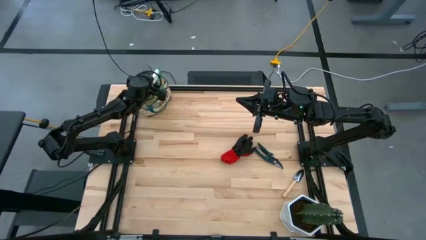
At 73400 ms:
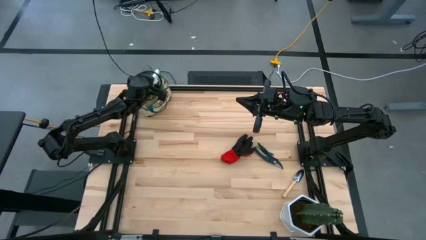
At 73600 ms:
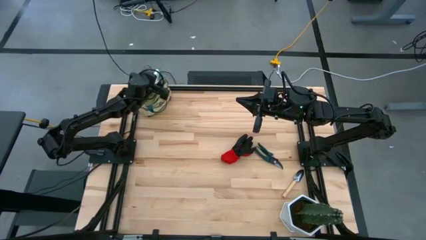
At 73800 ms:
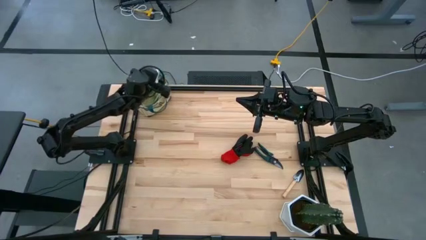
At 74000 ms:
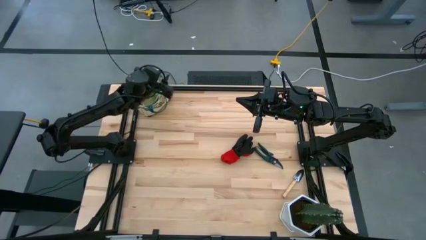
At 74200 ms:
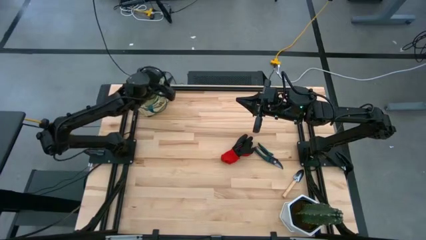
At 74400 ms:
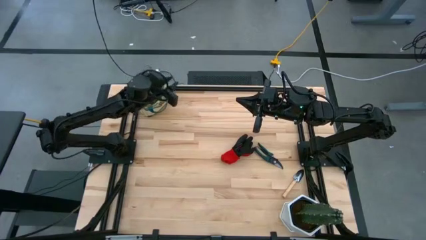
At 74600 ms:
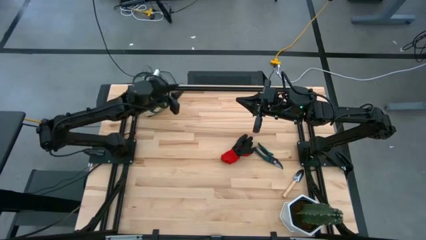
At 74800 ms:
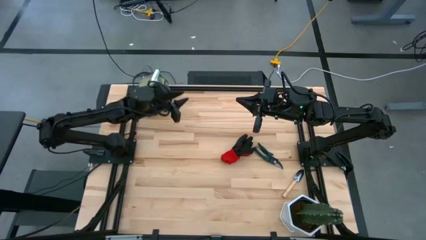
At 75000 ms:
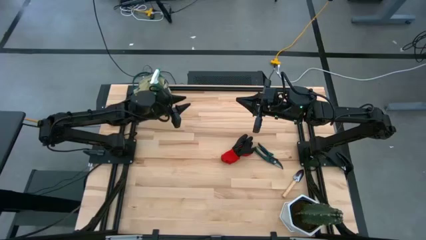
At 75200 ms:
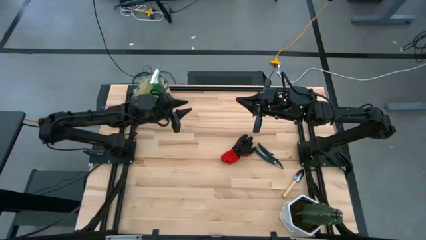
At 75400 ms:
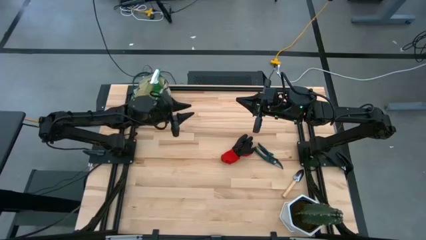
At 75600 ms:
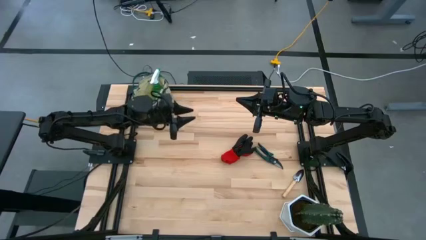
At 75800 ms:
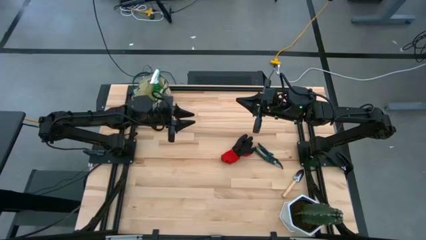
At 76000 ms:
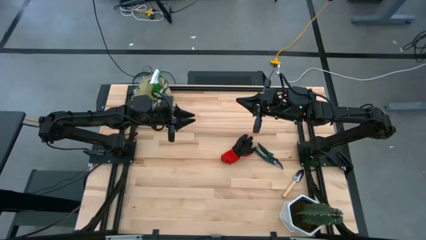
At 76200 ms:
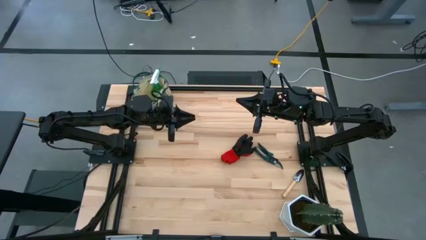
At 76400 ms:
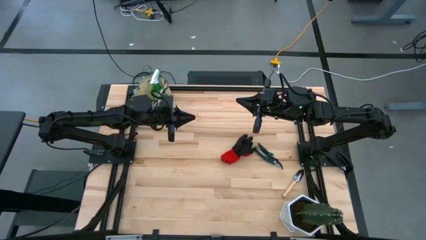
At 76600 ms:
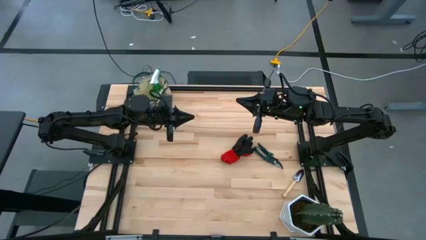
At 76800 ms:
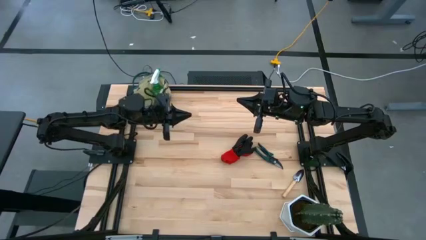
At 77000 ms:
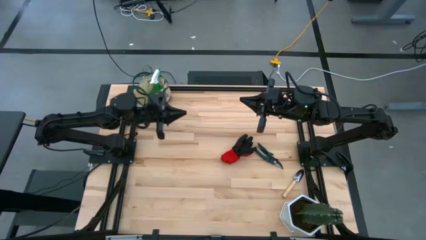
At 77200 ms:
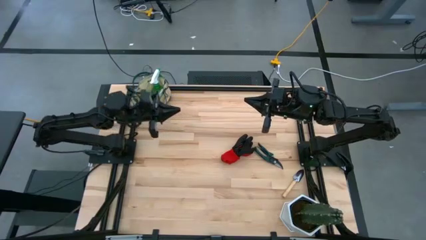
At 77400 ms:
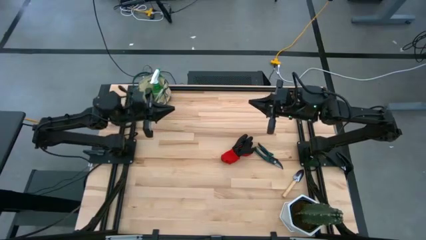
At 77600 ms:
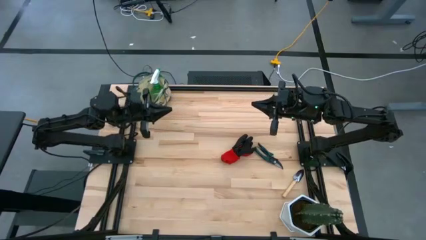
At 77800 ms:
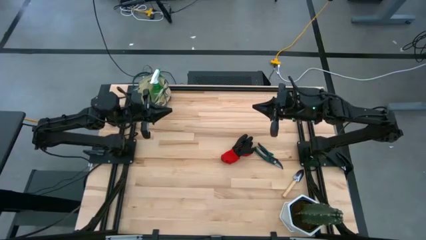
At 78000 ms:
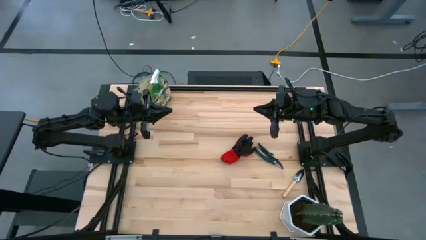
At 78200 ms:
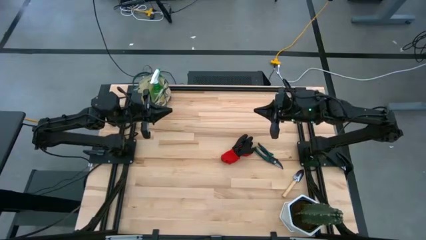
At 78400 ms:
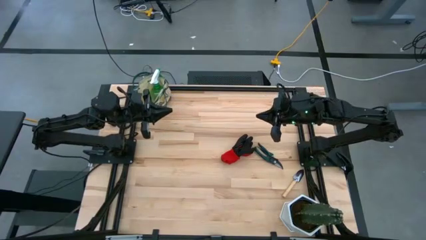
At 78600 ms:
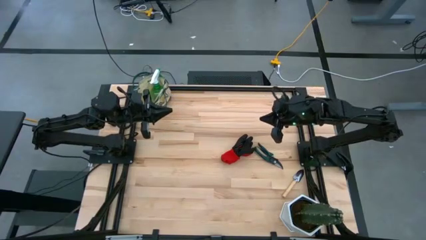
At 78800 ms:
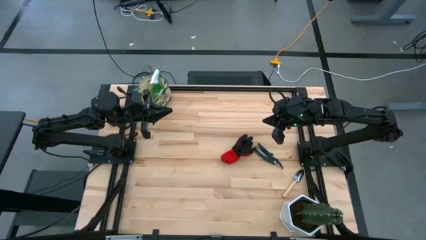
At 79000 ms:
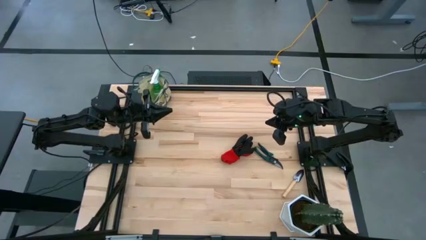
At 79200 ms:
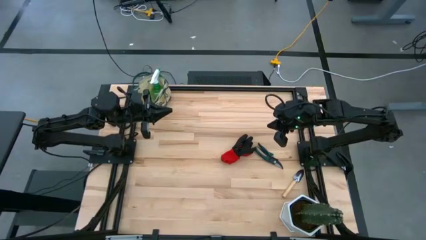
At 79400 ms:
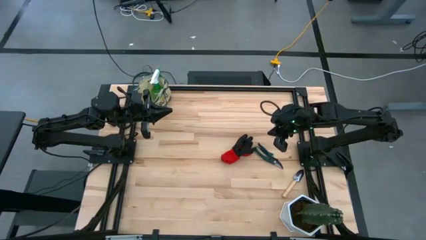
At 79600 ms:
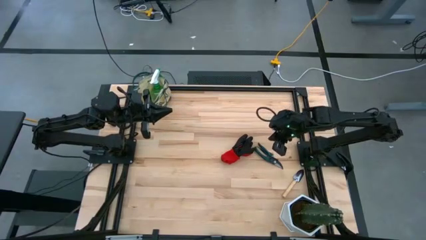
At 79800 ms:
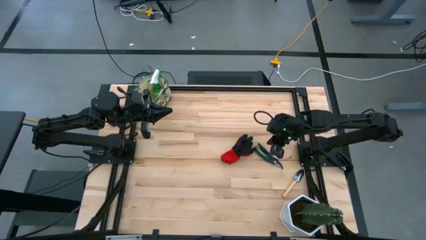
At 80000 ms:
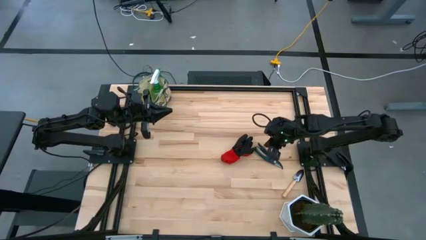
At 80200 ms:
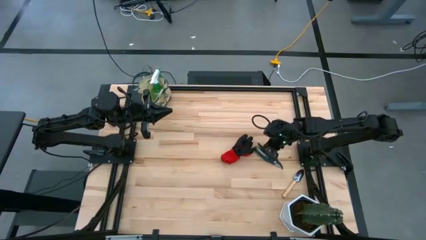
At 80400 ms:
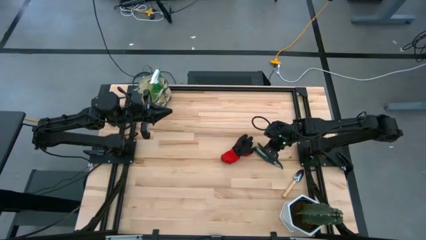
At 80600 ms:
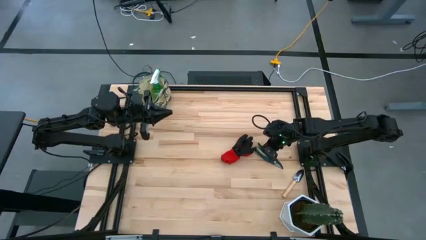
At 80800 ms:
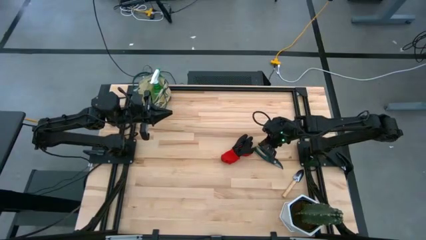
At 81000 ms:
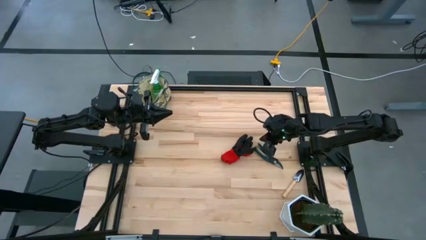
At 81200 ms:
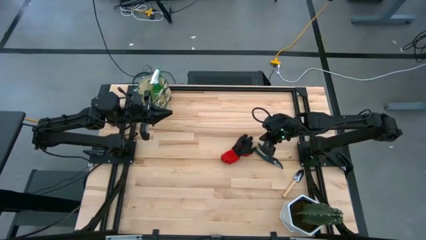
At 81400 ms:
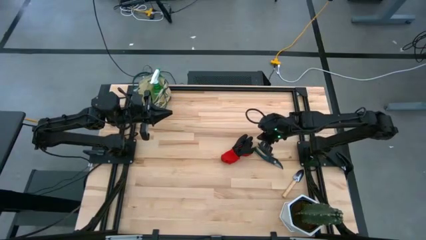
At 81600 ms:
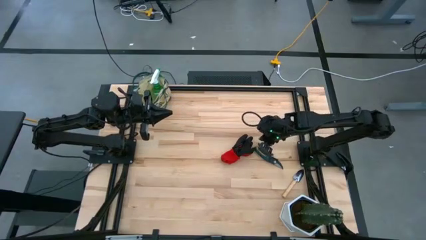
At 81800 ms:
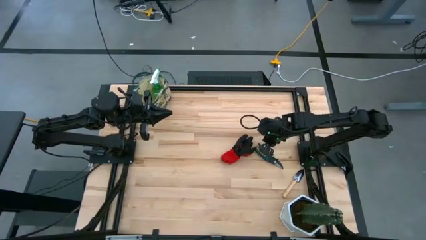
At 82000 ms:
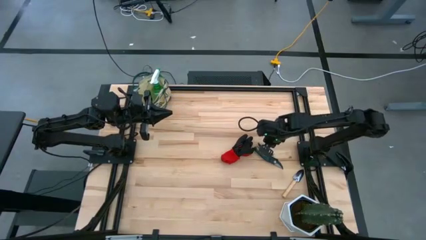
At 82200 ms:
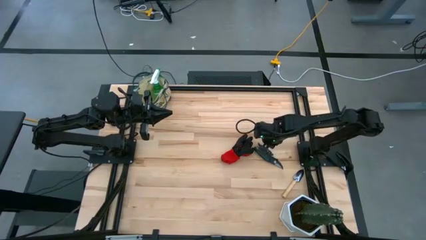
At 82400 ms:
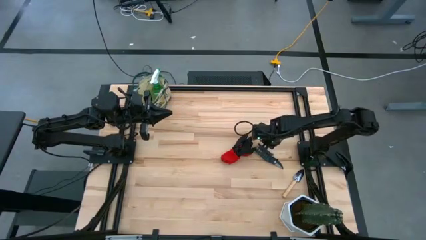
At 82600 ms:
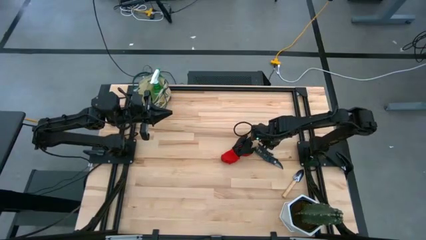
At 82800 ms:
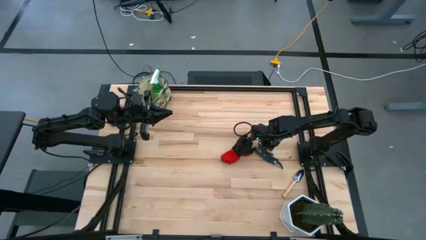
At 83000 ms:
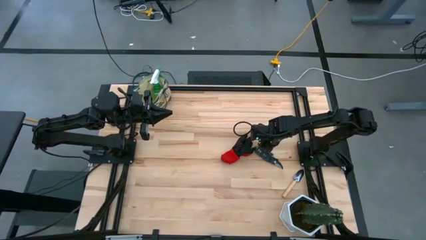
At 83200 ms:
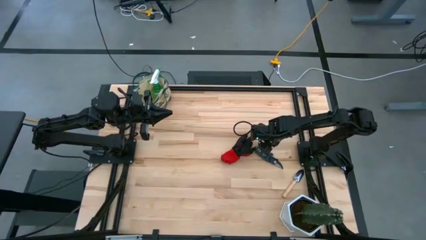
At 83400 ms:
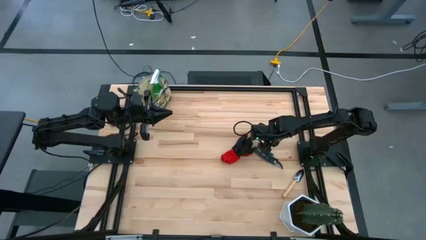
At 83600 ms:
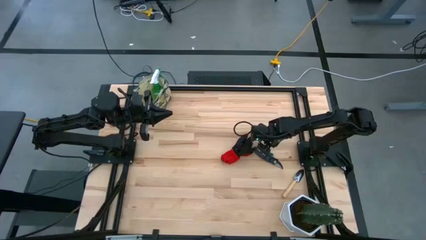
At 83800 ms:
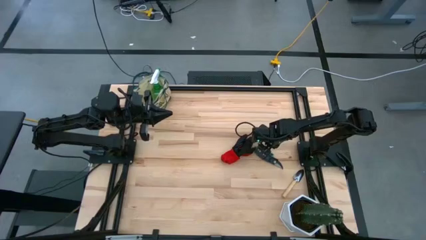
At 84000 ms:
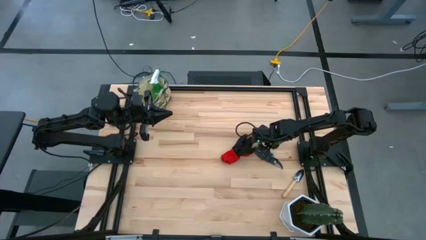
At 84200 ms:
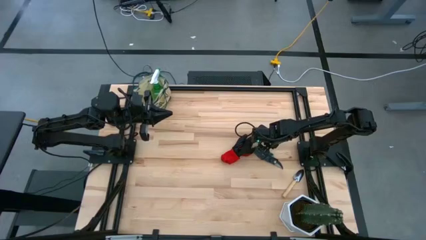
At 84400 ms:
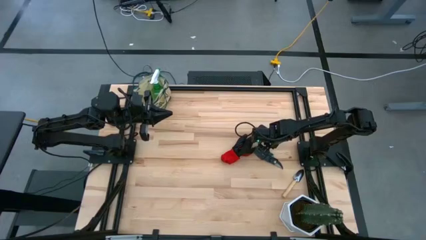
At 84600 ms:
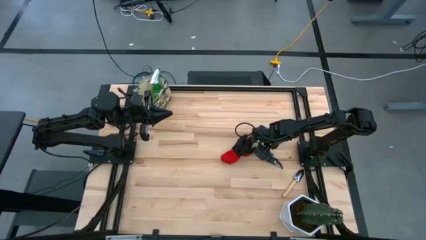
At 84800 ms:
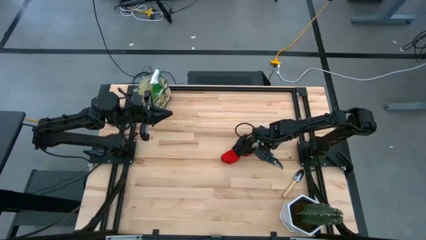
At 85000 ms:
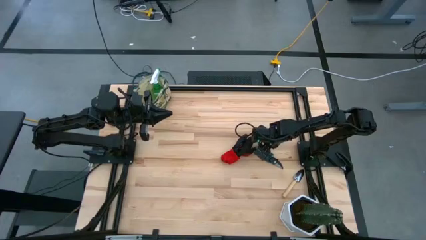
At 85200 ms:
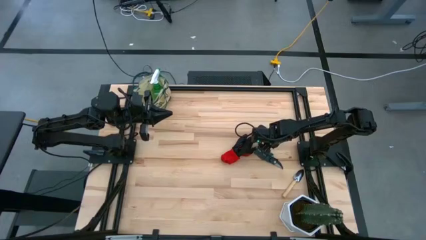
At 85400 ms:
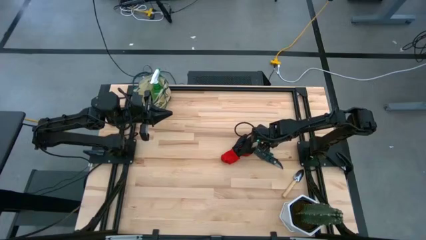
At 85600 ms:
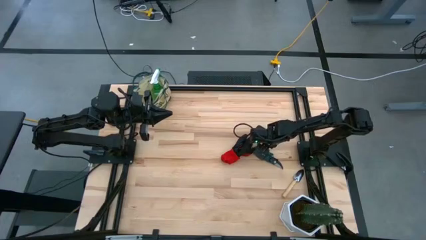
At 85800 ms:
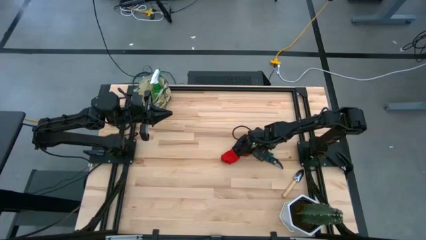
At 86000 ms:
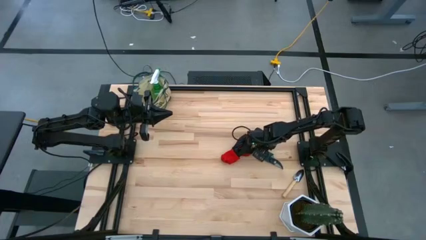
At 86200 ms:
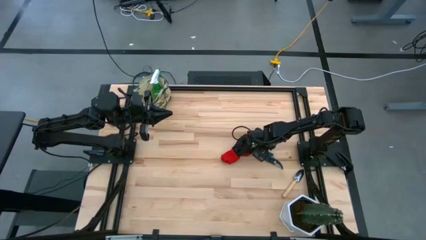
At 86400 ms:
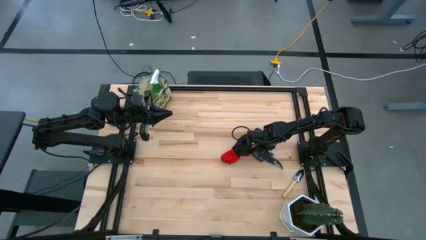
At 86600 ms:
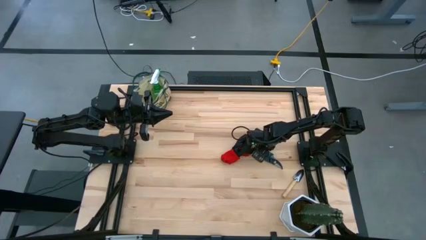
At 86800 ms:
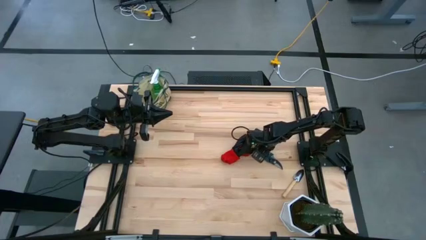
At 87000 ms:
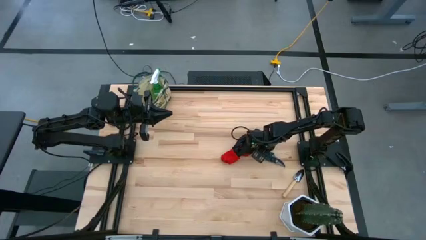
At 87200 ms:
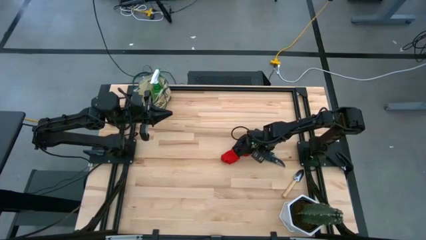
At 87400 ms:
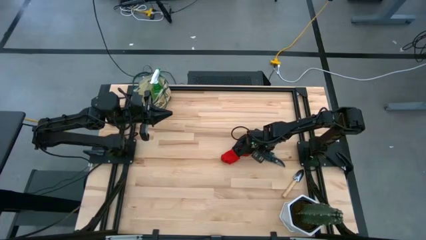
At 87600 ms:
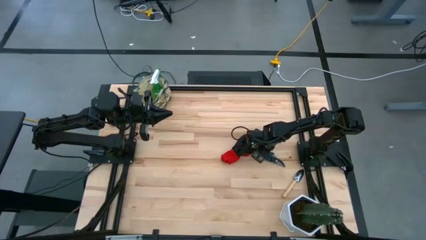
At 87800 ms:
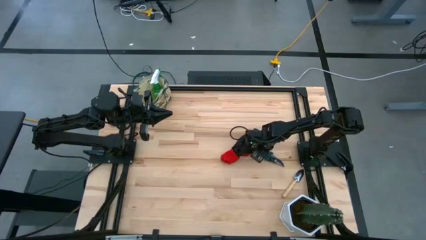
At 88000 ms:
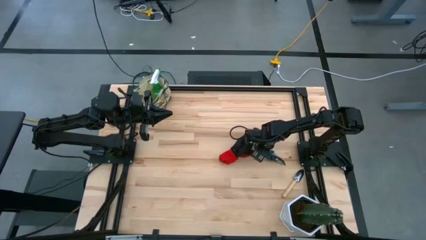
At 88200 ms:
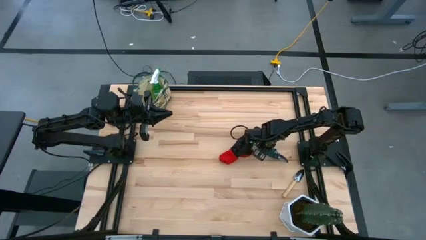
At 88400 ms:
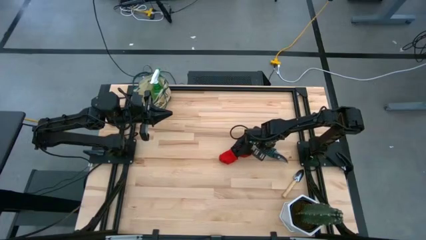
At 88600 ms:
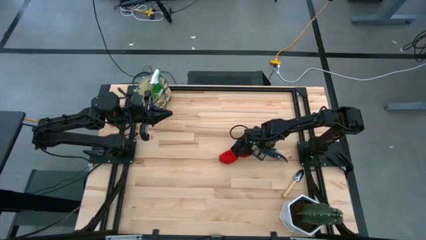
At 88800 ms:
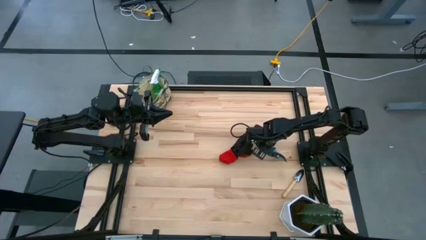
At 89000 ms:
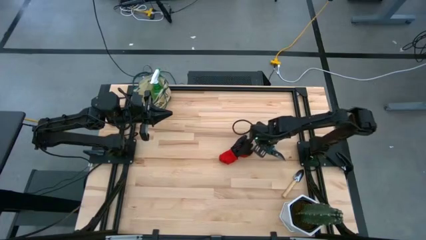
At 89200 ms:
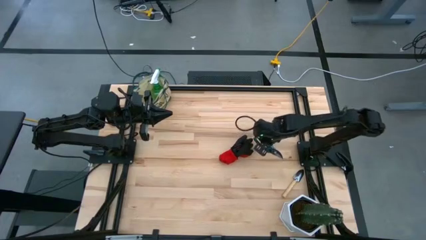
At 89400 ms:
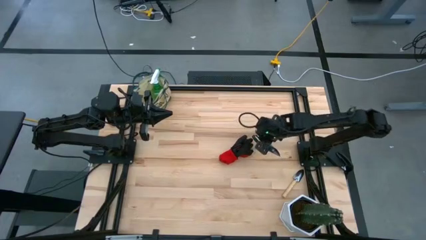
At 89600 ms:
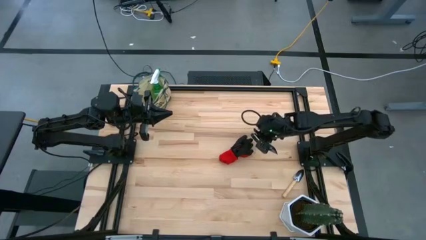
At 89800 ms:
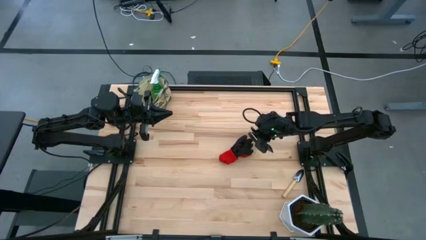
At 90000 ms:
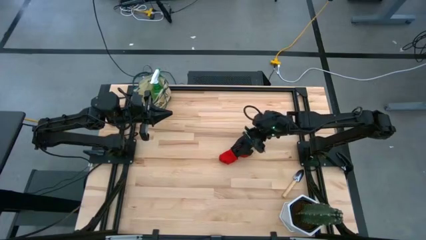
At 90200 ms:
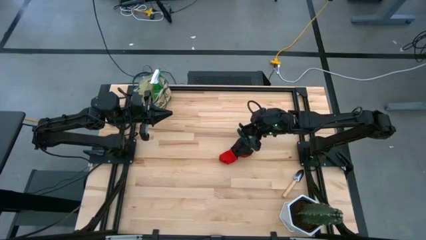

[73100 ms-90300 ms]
Task: Pick & Place Garden tools in Gardening bag
Put the shear scissors into the gardening bag
